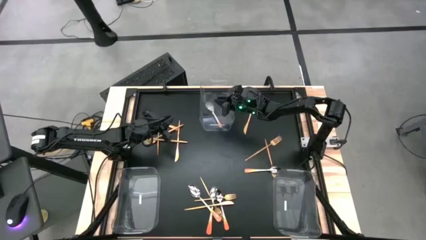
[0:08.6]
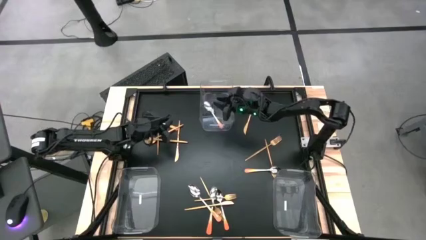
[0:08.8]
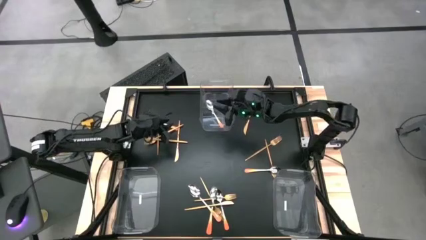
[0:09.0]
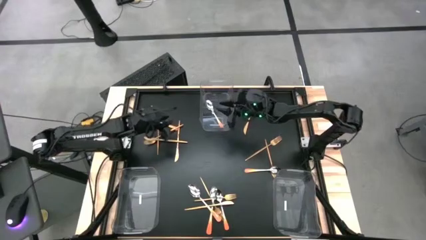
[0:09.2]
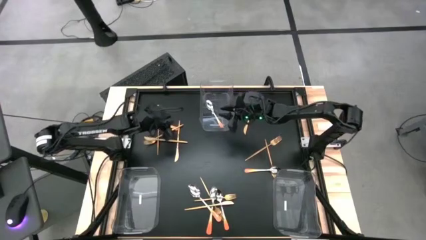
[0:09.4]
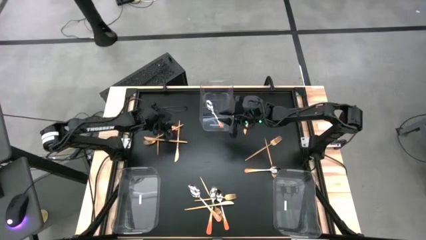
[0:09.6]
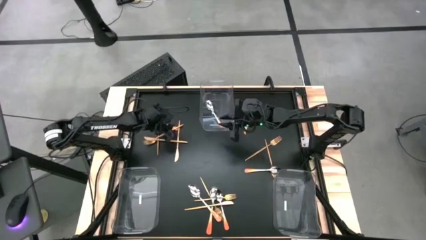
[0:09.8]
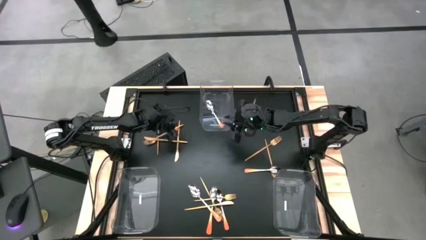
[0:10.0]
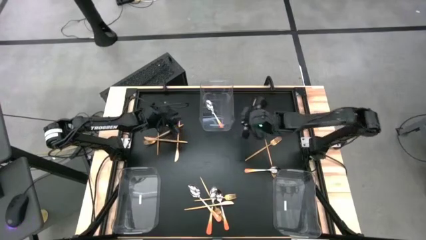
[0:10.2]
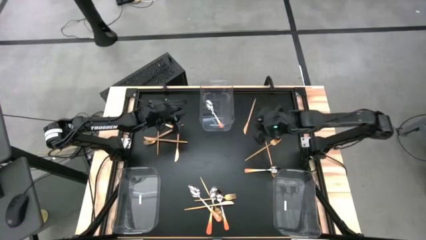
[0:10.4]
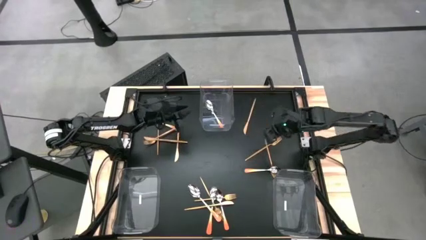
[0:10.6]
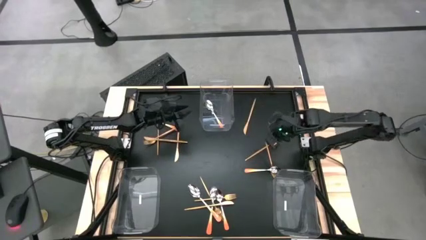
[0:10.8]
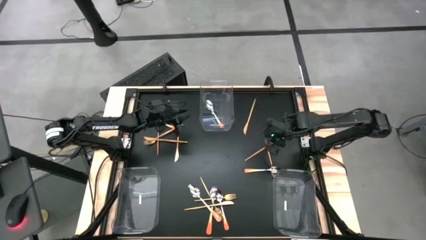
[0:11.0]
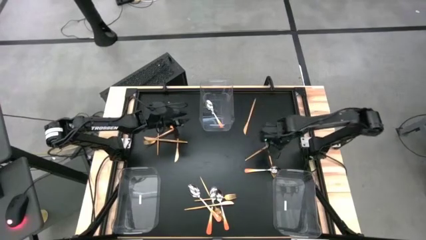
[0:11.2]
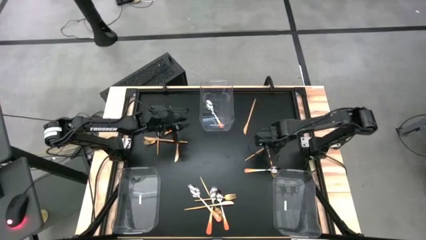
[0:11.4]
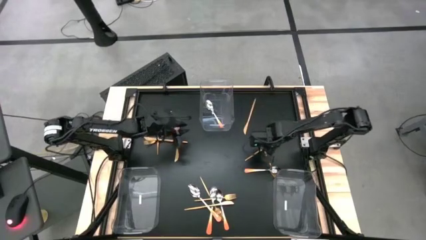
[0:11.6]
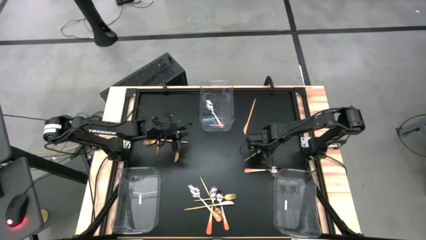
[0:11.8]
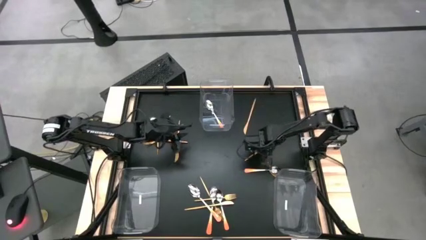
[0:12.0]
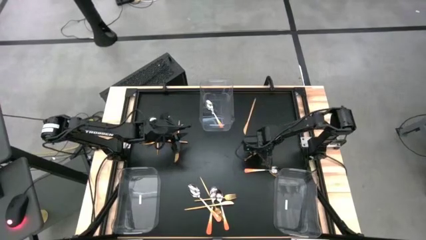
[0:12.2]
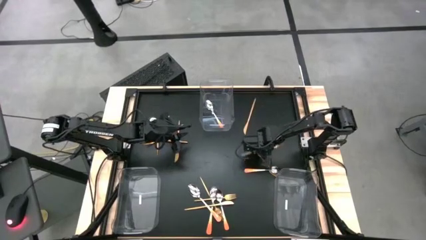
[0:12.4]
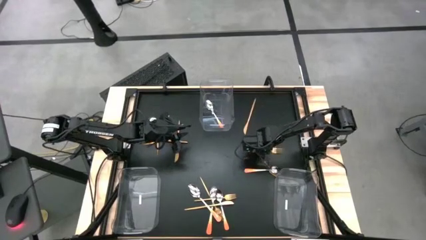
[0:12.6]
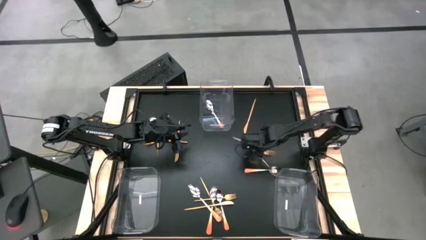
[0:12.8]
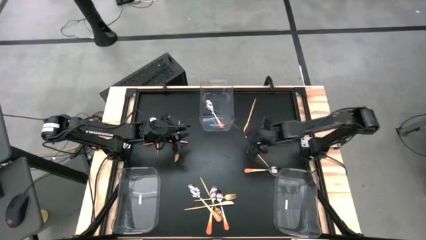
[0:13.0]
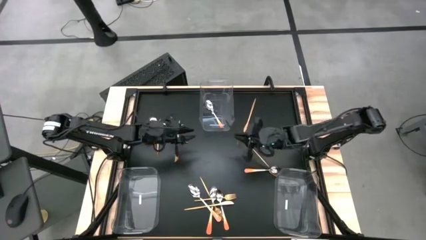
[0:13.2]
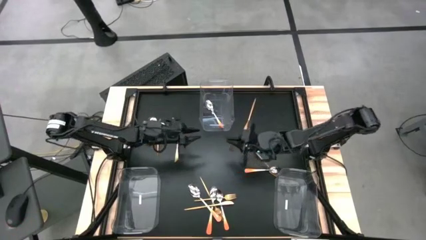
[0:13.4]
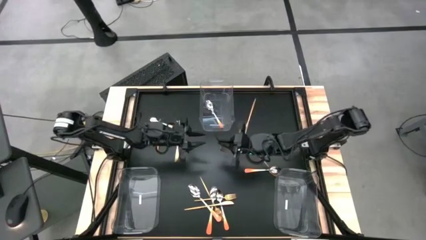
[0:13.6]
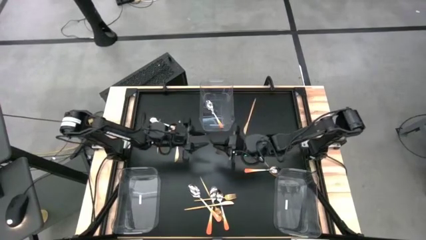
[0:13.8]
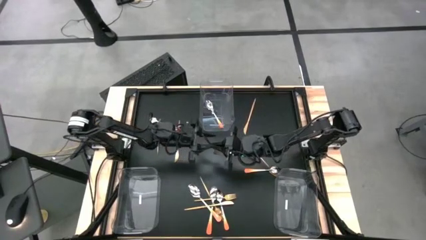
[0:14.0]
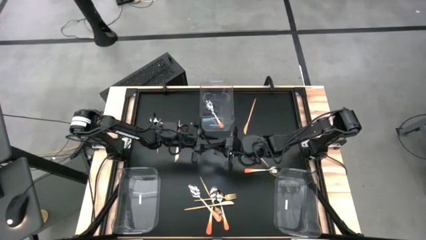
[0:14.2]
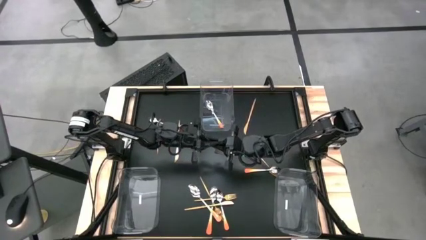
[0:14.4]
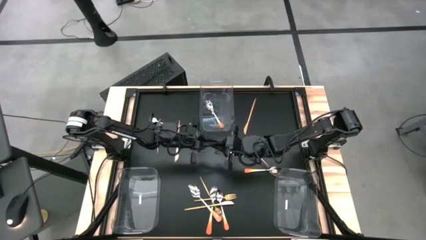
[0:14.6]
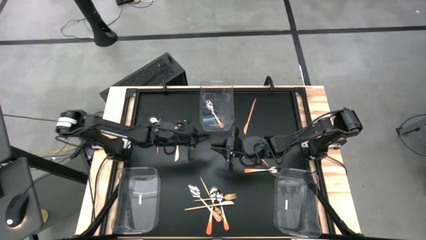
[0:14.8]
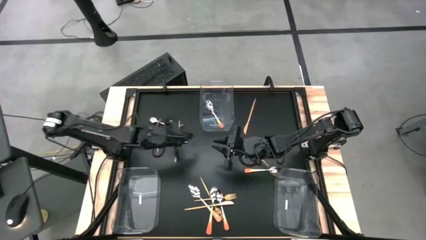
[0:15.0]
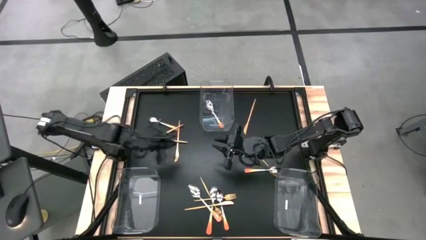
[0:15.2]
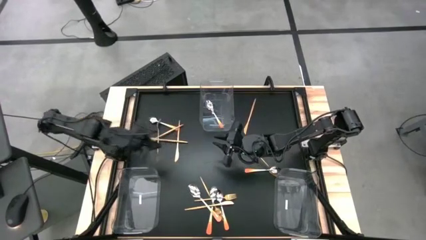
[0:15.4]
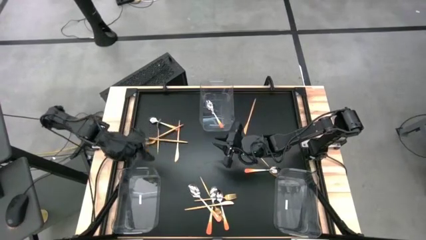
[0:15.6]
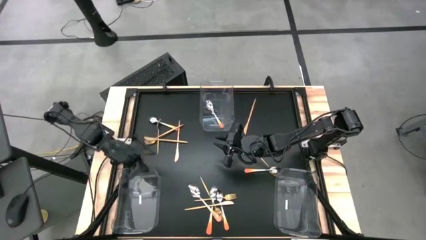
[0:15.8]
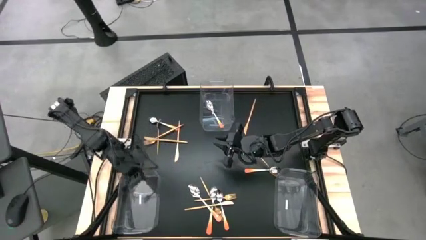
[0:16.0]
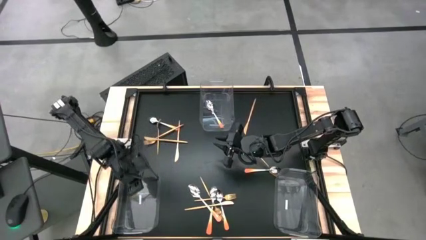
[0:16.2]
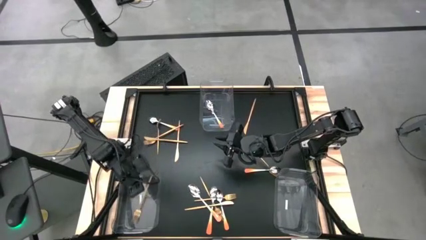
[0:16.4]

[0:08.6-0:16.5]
Task: Sort silverware by color (type)
Put the gold fork into the bottom left transparent bin

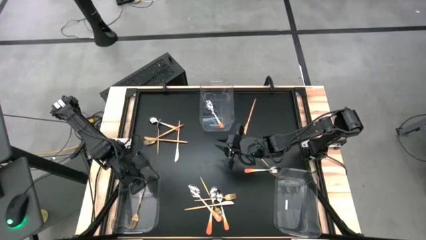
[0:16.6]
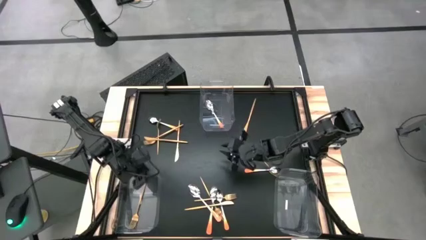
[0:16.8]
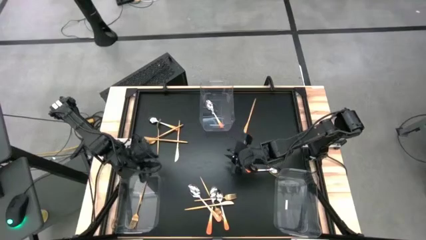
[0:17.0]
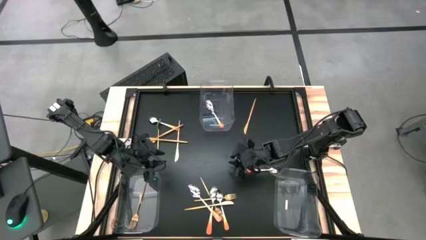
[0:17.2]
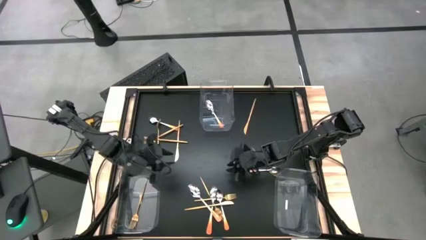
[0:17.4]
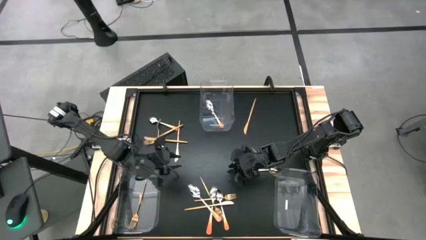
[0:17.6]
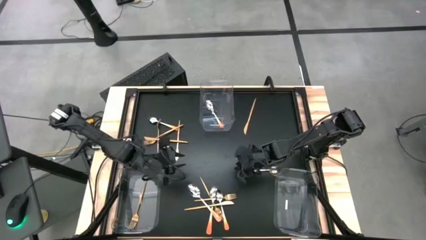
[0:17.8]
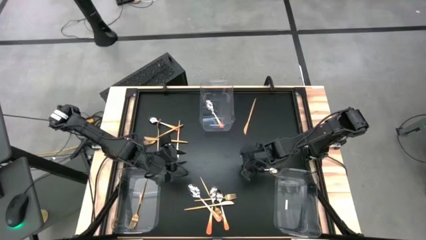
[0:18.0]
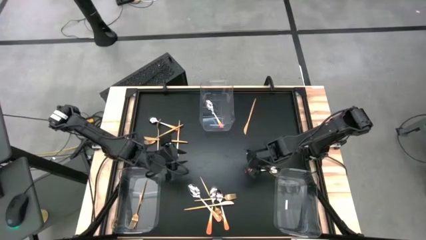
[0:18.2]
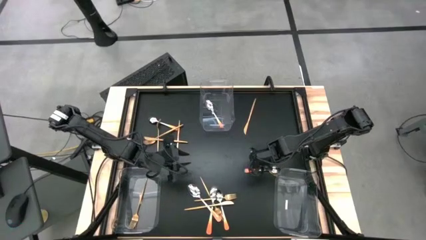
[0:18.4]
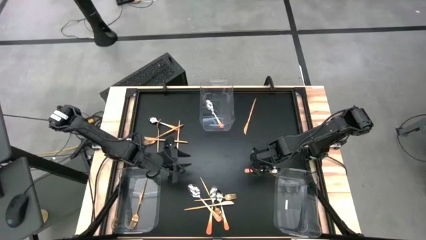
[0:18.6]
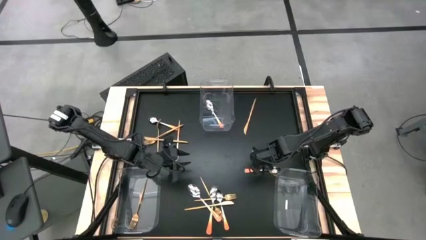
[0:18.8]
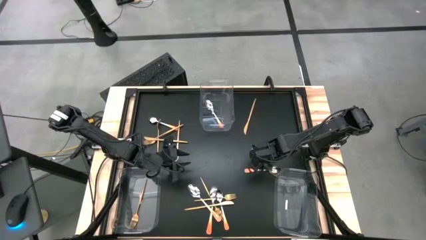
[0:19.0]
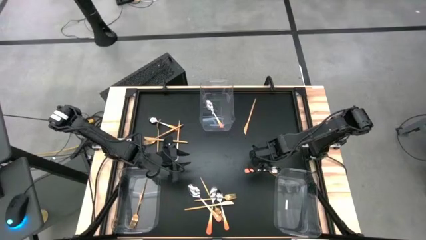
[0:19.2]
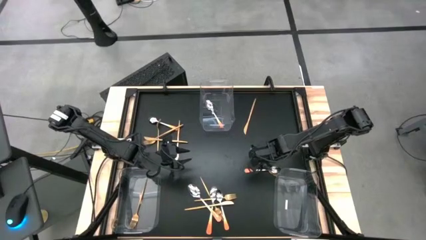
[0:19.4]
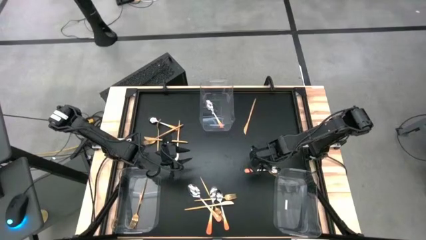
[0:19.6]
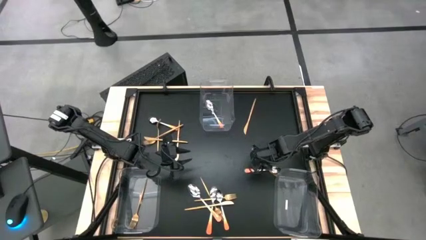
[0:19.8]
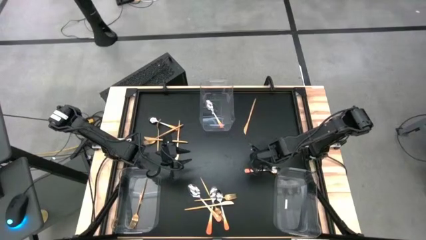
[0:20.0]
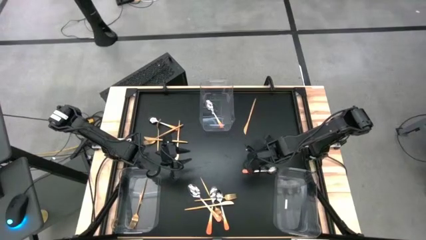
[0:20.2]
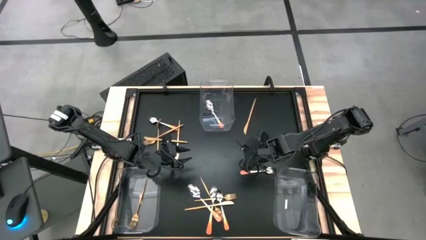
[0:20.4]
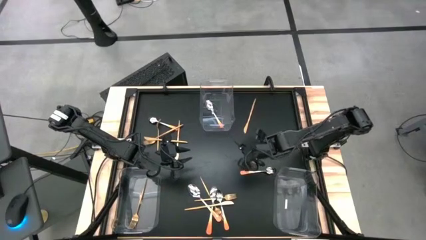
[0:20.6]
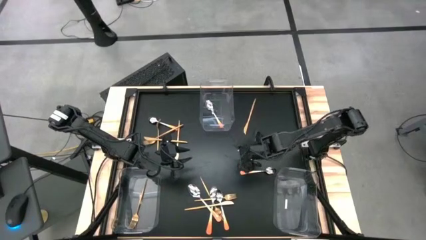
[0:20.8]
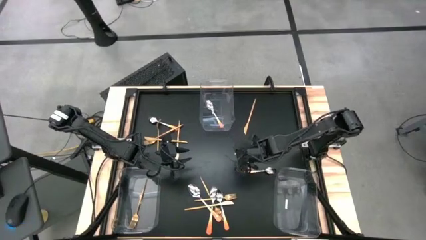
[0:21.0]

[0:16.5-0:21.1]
Move the gold fork to the center of the table

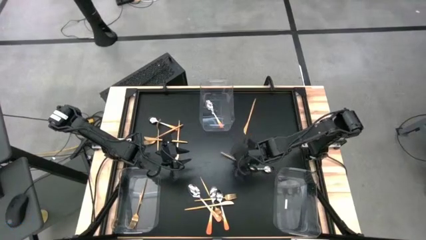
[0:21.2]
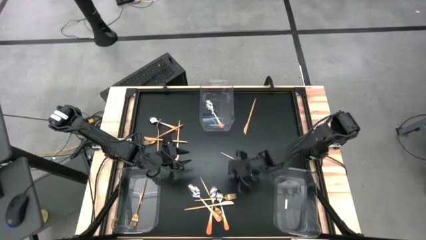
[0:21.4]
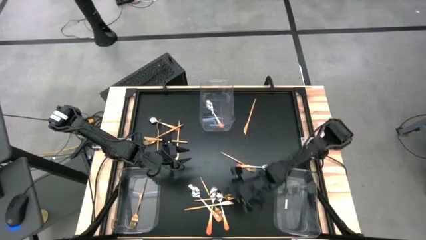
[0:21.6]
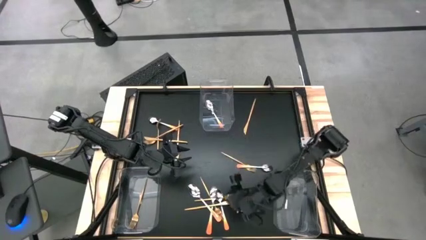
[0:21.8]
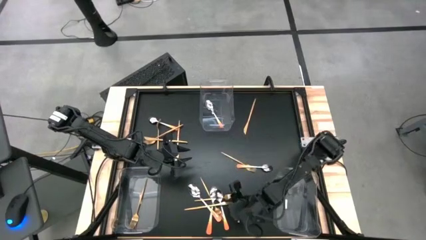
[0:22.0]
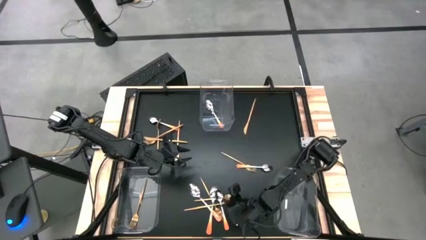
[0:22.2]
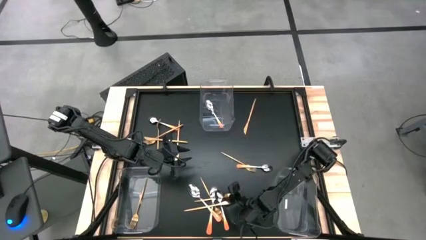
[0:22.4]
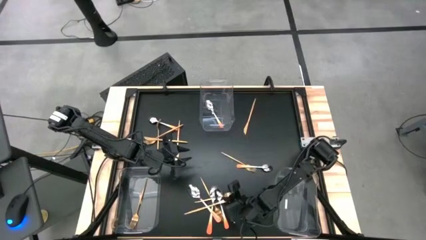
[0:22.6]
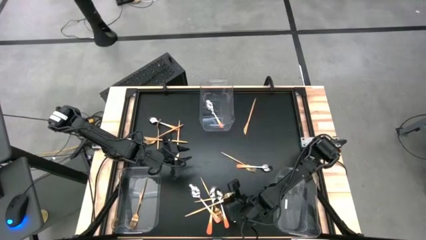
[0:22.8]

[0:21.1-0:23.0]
Put the gold knife into the bottom right transparent bin

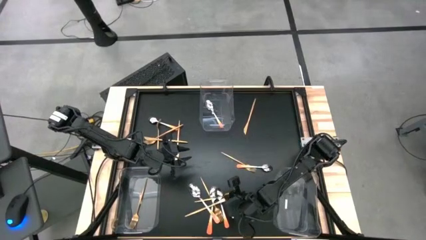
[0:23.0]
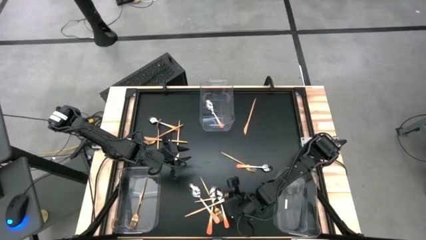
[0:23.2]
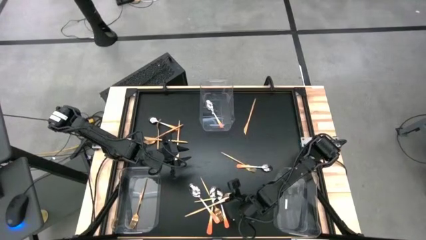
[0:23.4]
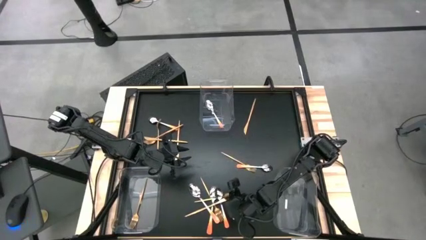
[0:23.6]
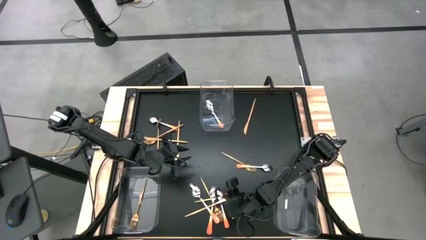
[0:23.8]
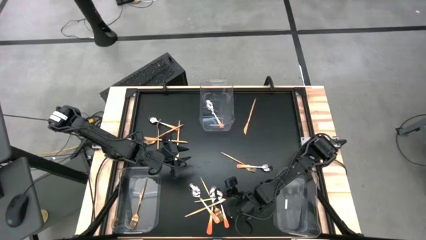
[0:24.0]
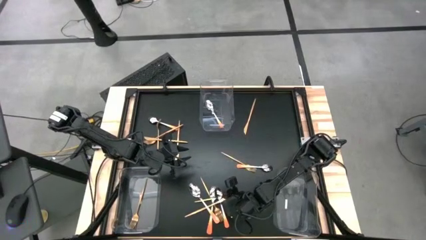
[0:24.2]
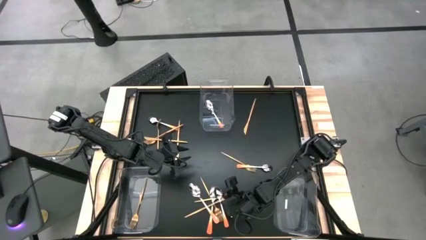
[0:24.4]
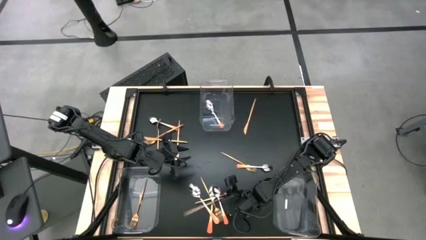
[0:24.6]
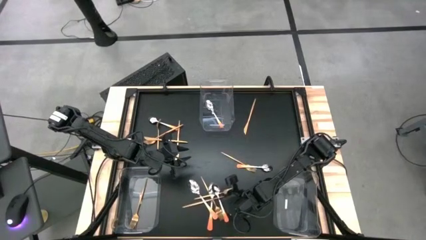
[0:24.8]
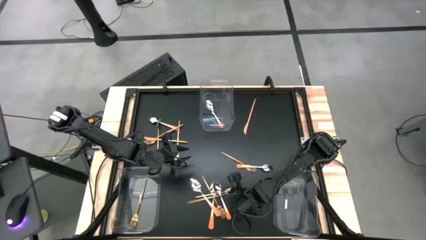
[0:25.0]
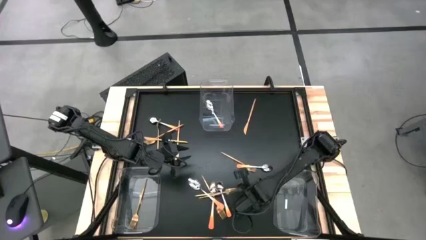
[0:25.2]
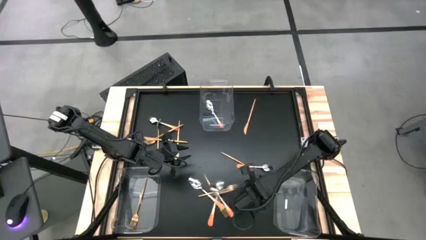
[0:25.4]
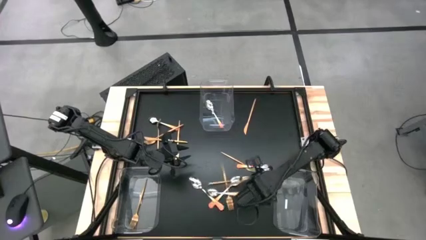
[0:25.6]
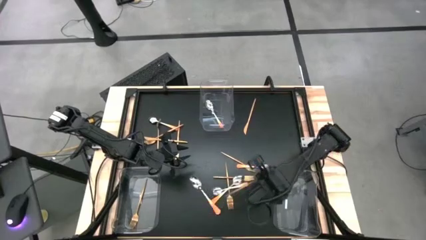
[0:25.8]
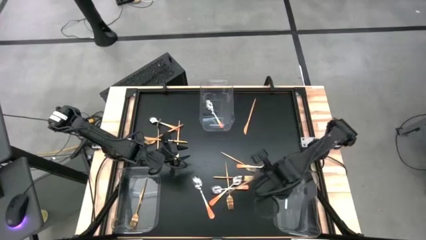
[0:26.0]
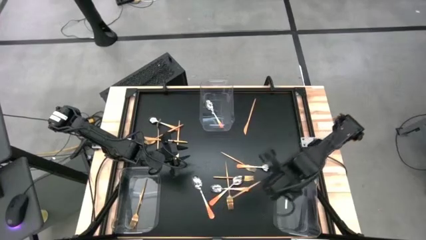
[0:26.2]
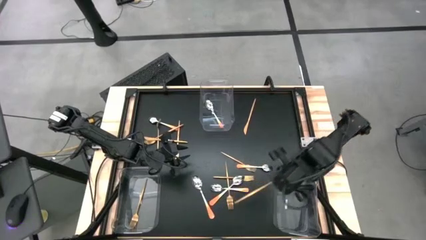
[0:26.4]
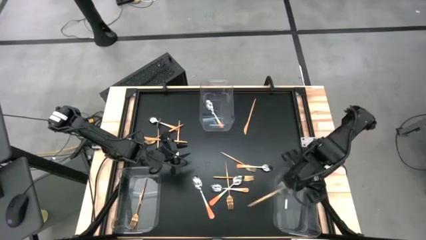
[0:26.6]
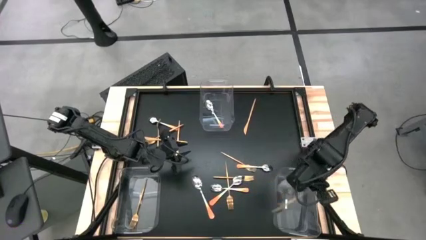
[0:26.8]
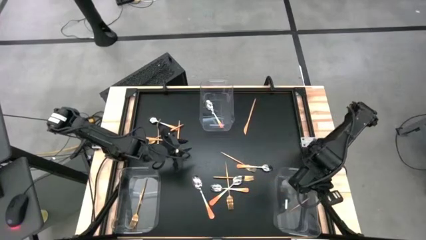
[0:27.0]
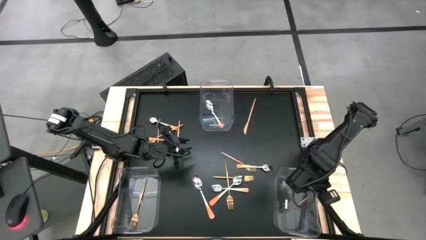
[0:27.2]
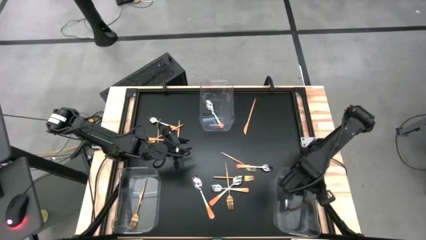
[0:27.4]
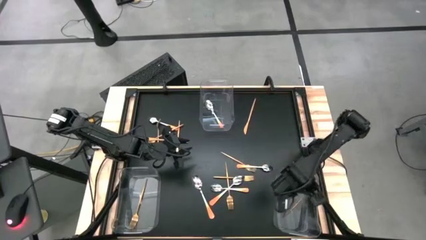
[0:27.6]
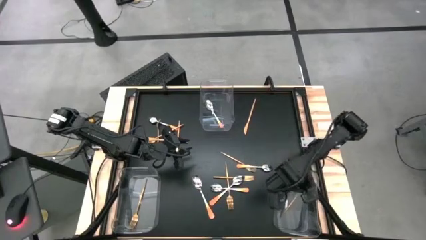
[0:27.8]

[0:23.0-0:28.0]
Put the gold knife into the bottom right transparent bin
